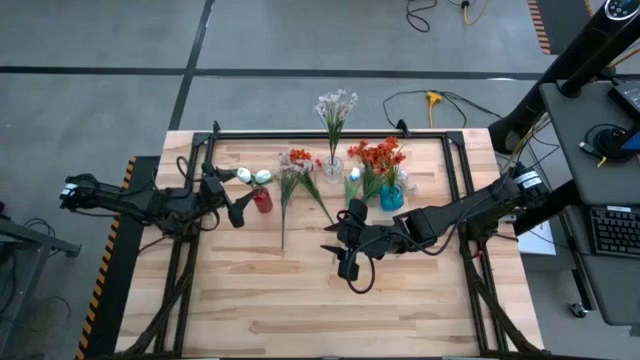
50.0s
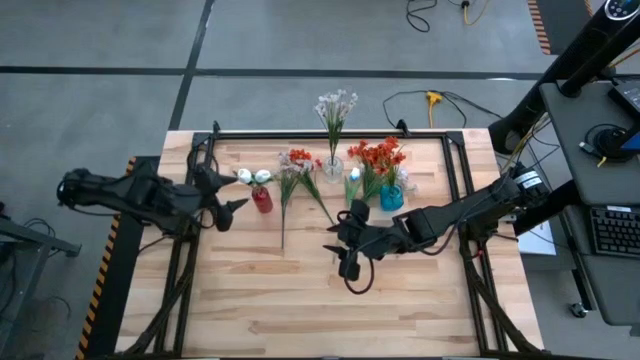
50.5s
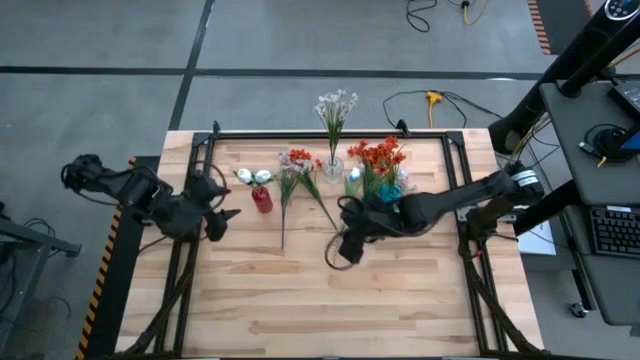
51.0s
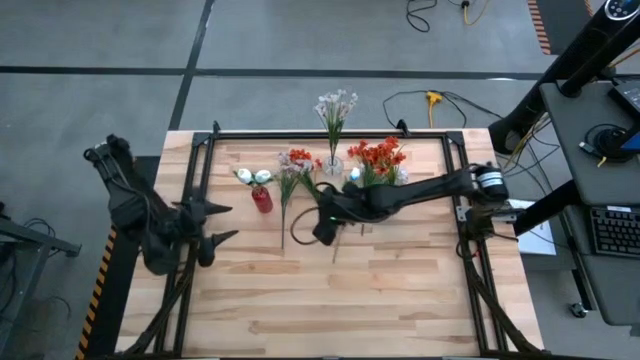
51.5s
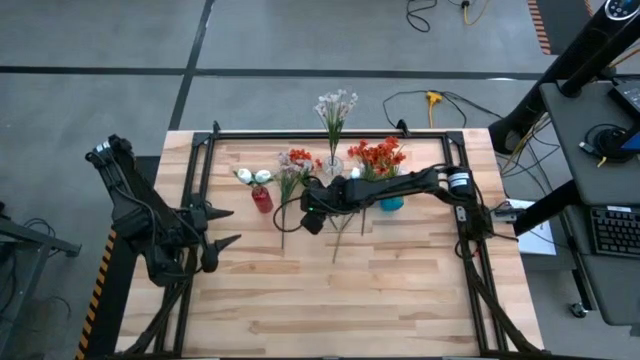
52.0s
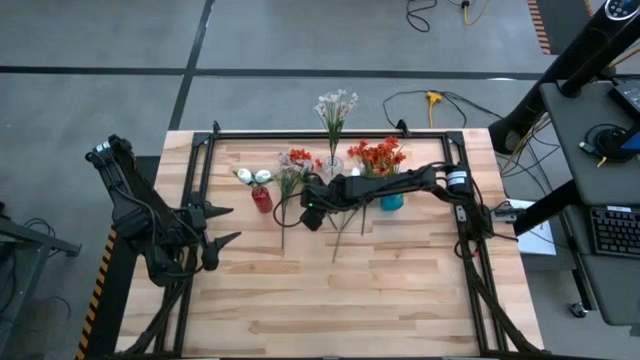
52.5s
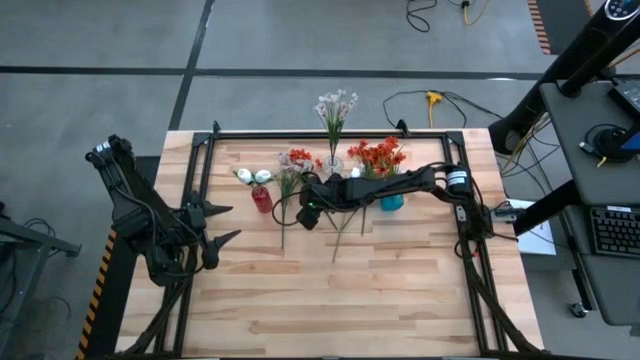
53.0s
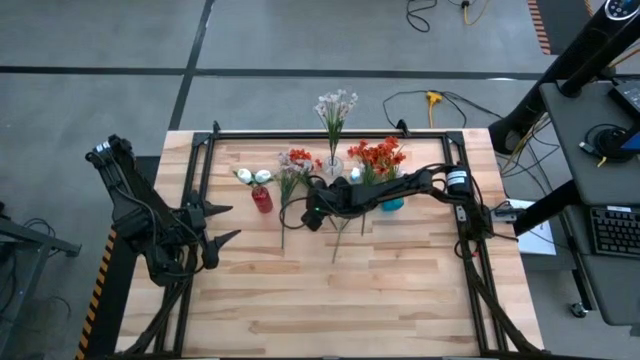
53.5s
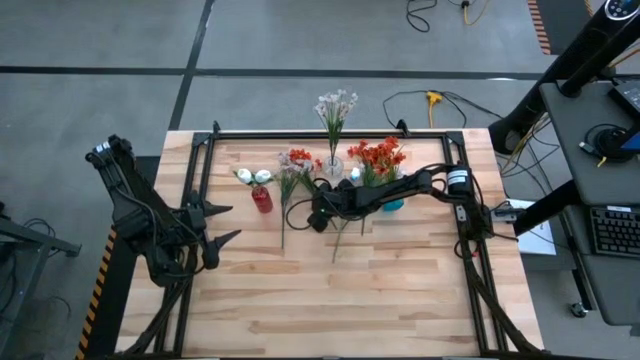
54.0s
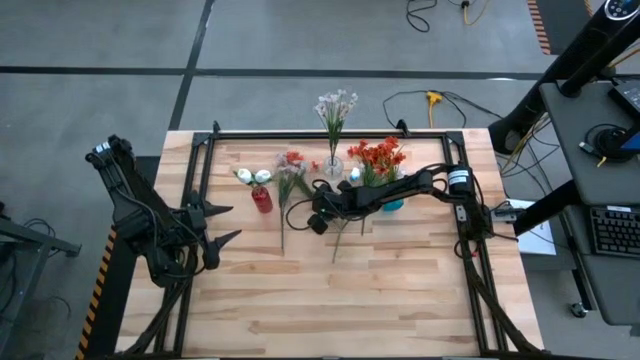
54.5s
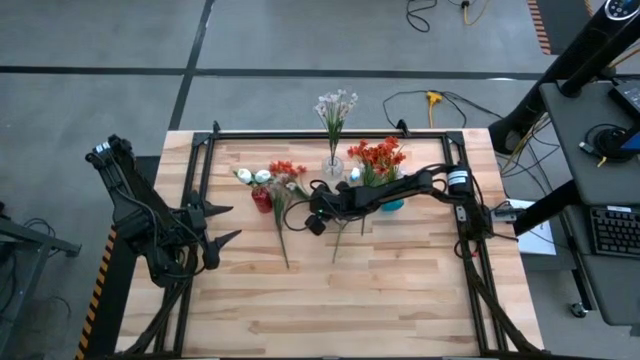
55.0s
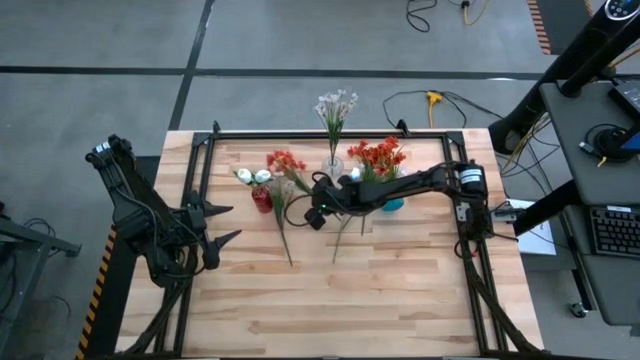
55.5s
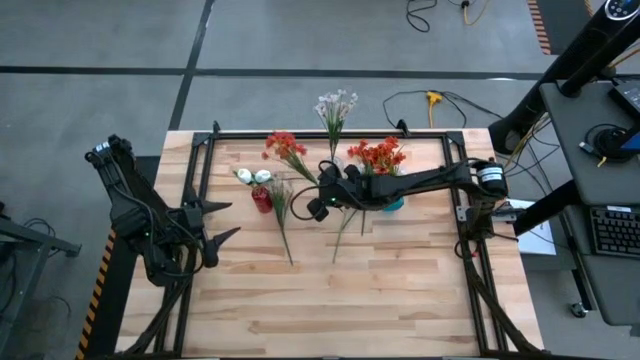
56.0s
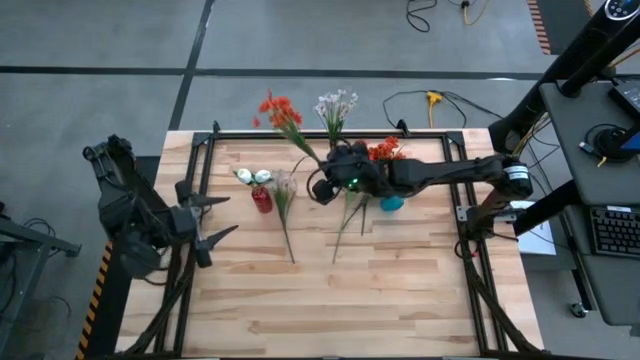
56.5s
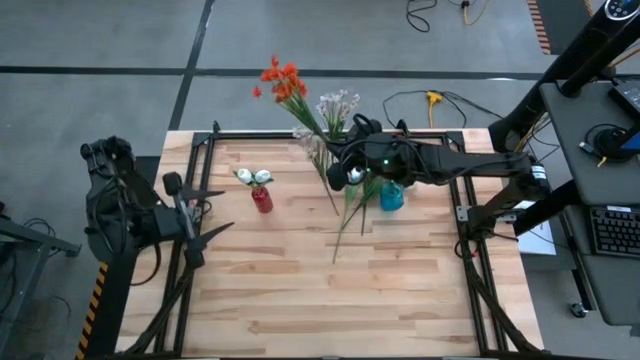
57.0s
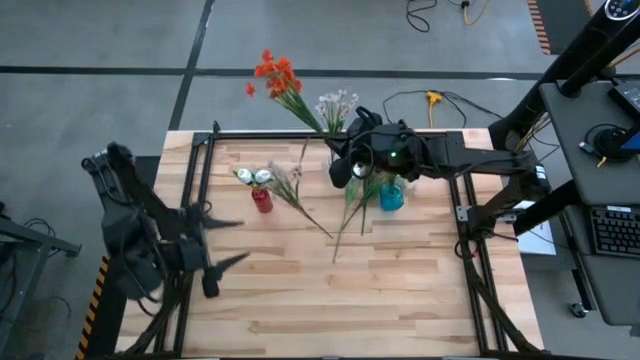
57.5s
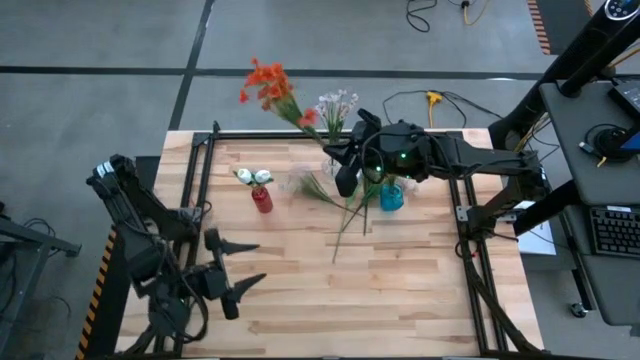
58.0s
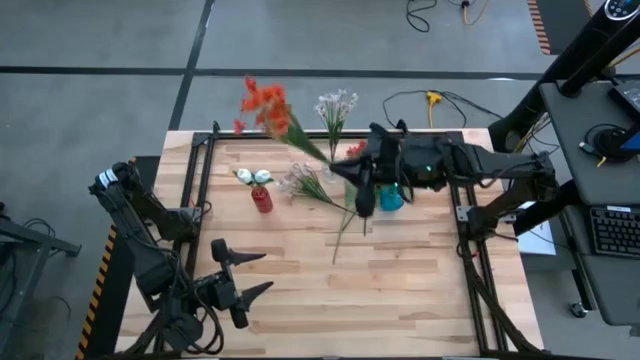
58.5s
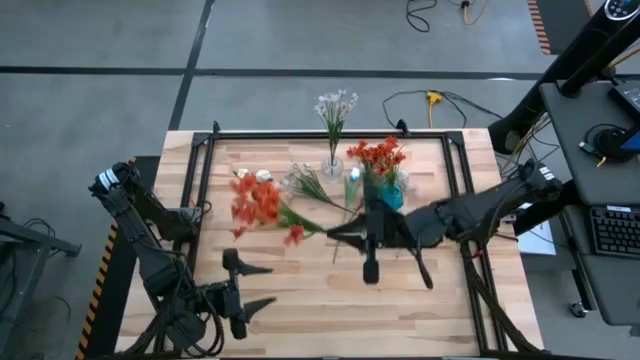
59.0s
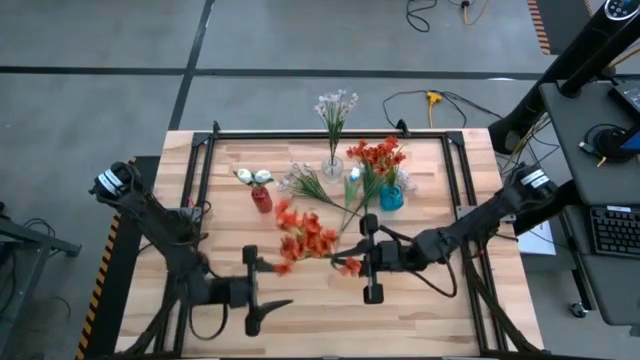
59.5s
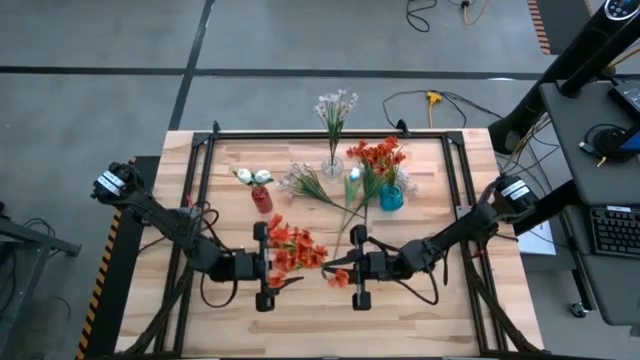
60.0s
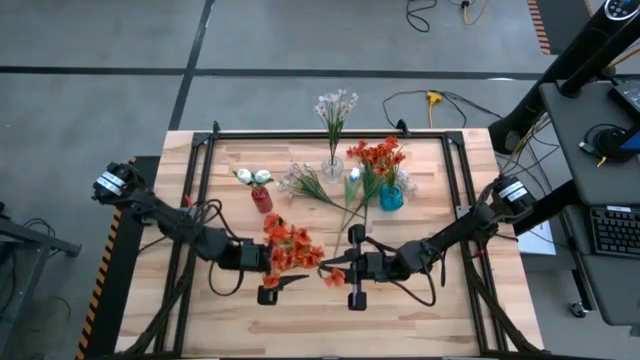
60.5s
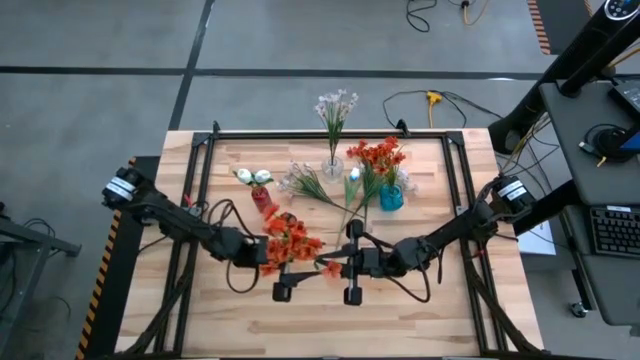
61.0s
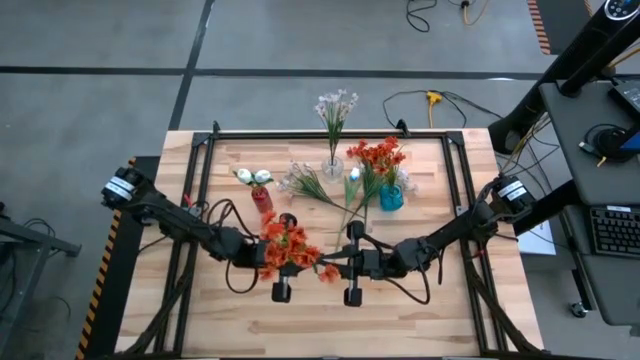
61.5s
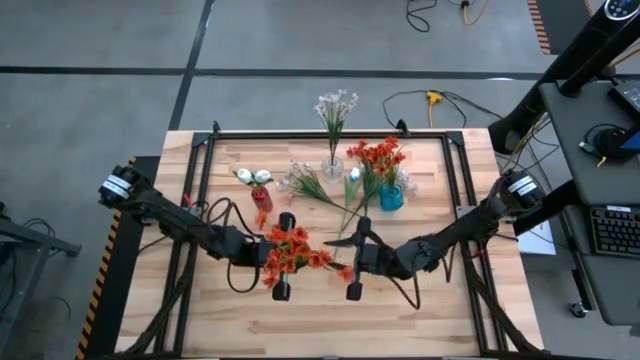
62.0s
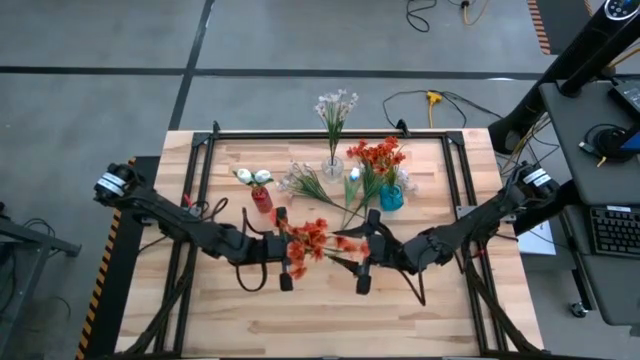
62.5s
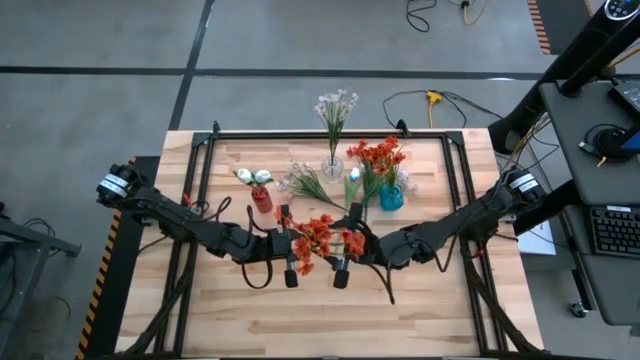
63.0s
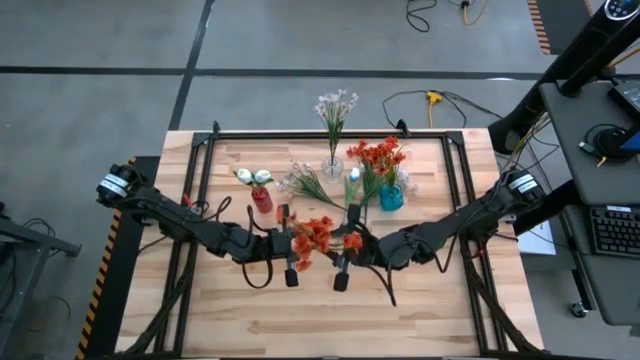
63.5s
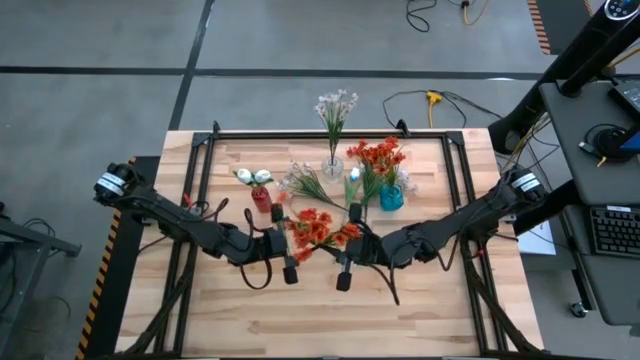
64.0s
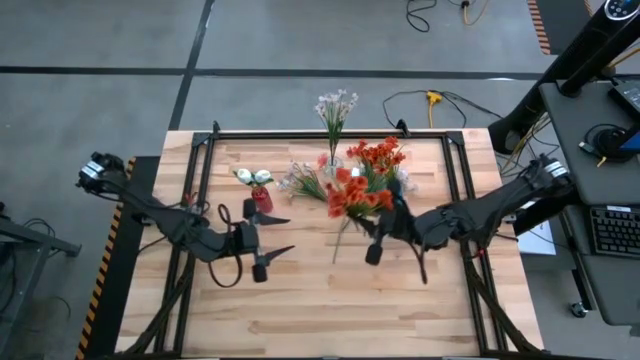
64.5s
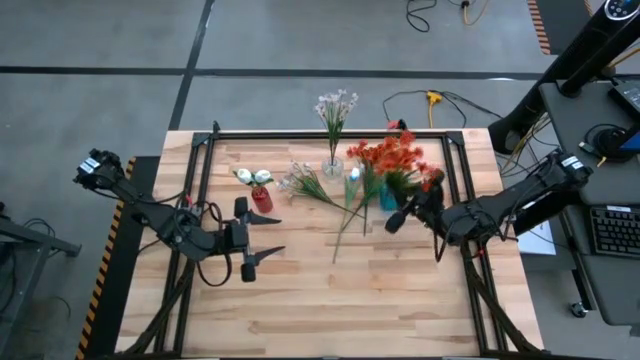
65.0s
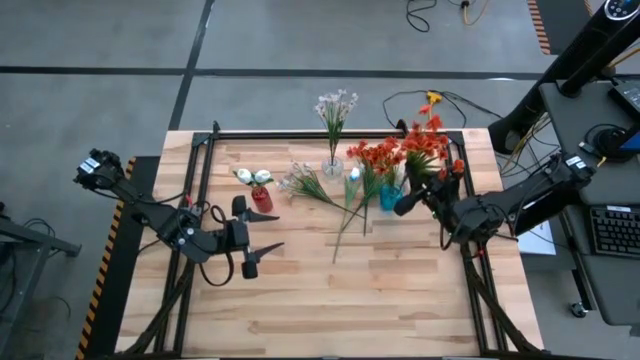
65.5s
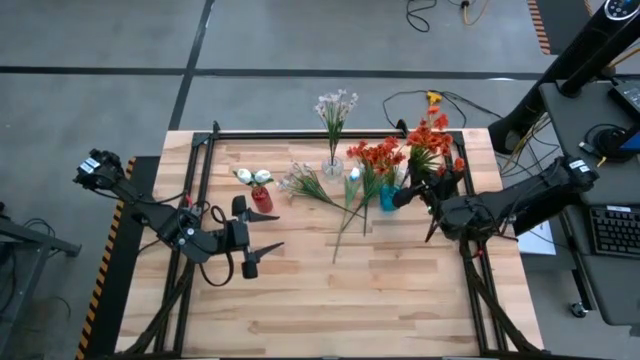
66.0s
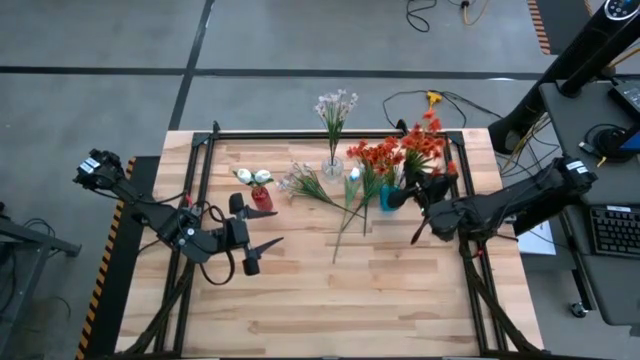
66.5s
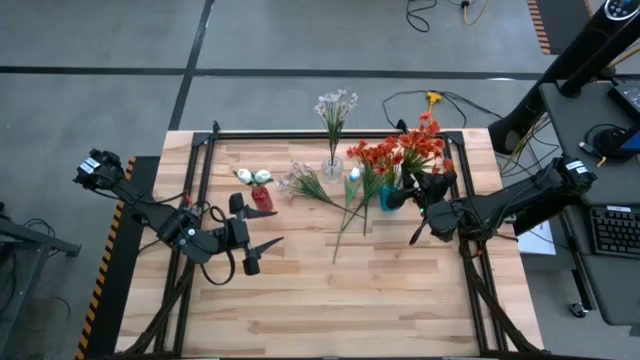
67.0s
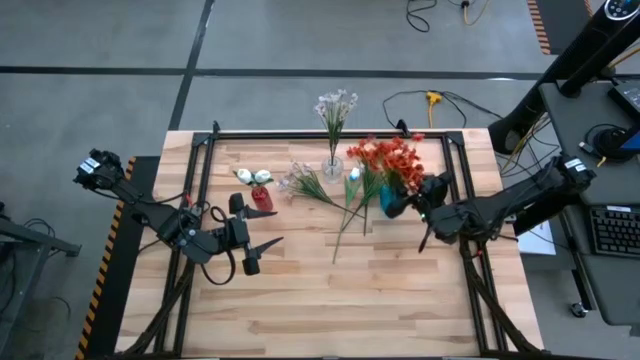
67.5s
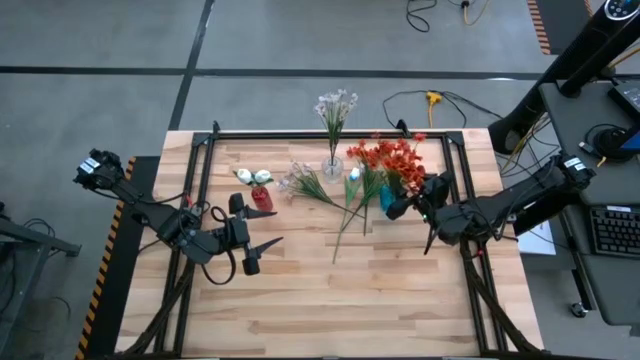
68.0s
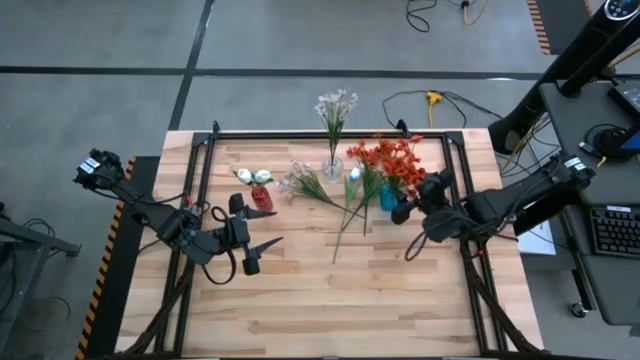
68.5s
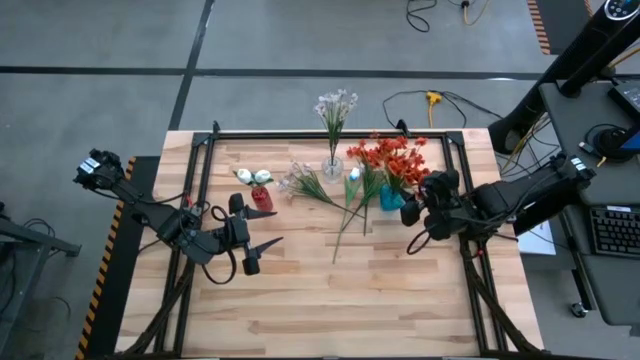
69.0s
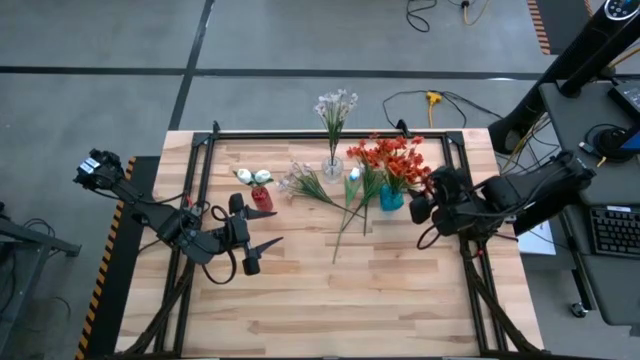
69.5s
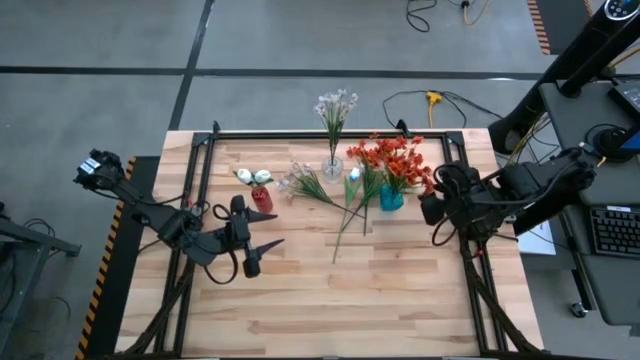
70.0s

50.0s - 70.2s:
Task: Sort flowers into vase by color
Put the left orange flowers into the blue vase

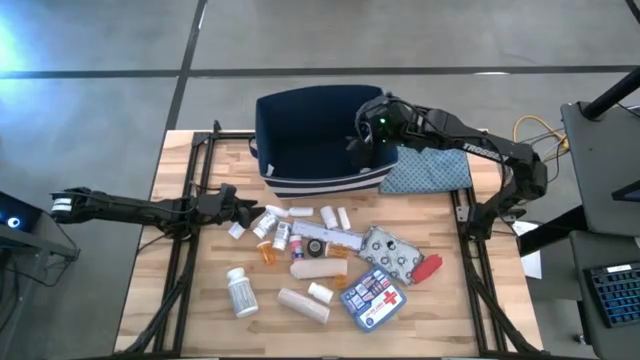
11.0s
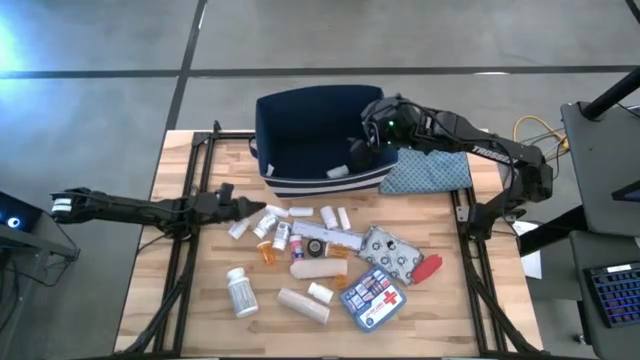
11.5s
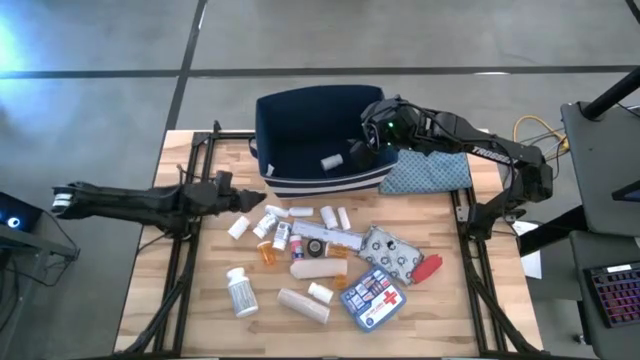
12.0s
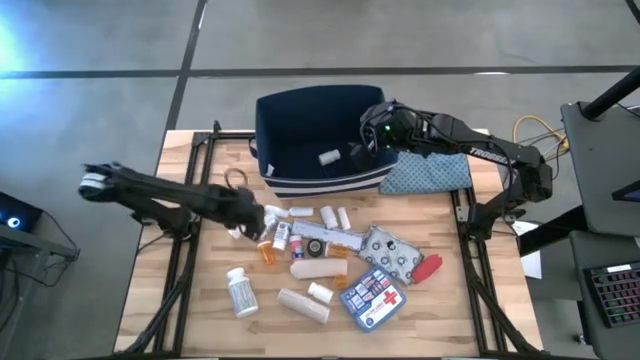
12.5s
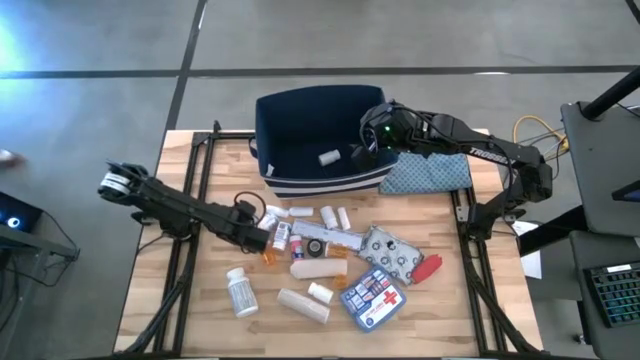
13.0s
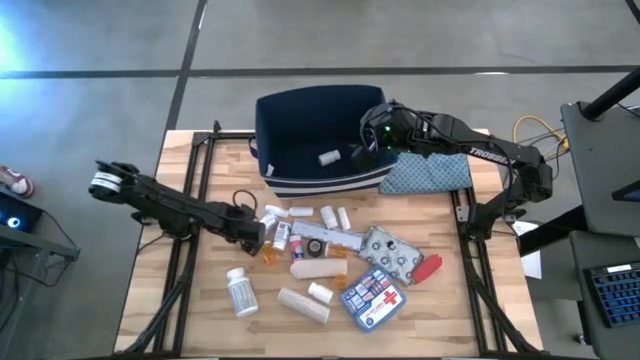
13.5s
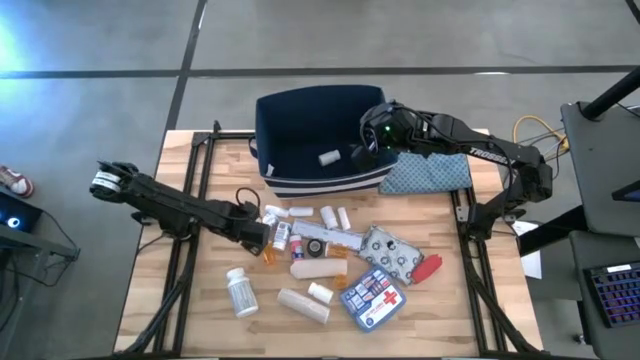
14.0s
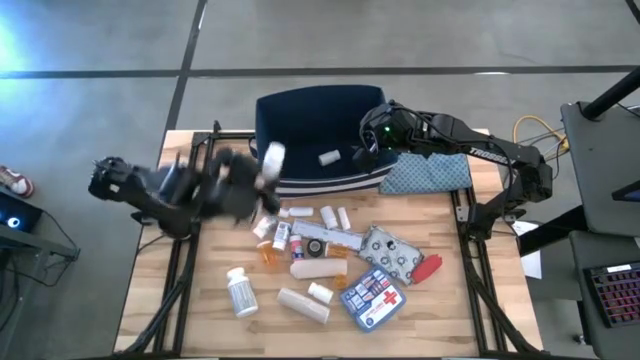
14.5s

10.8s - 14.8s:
Task: Pick & place medical supplies in basket/bin
Put the white medicine bottle into the blue bin
